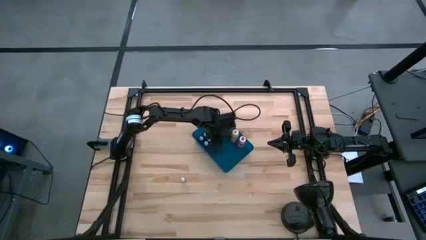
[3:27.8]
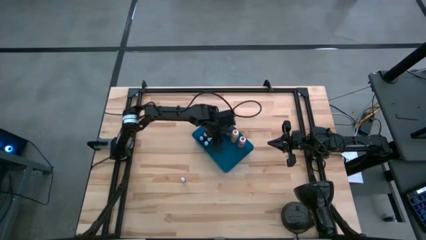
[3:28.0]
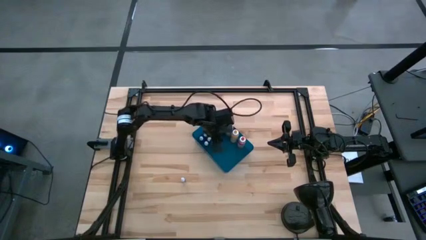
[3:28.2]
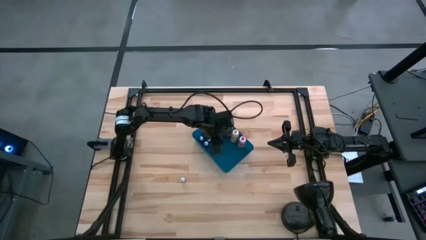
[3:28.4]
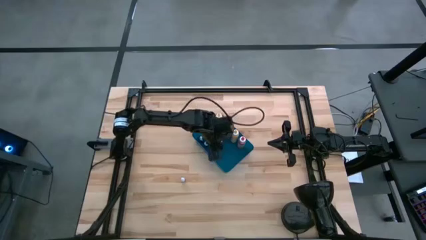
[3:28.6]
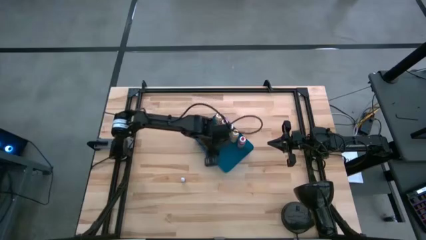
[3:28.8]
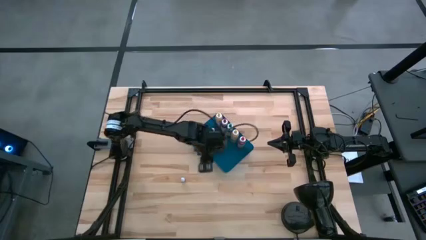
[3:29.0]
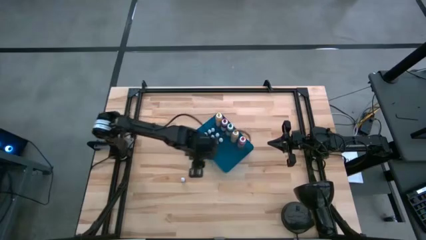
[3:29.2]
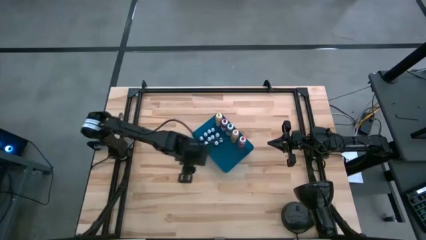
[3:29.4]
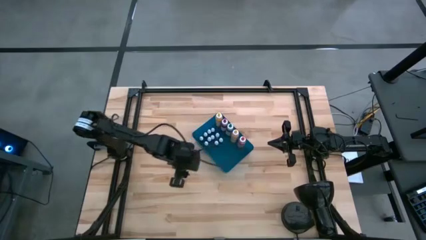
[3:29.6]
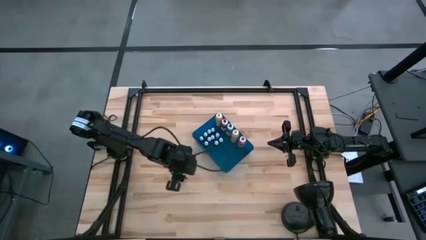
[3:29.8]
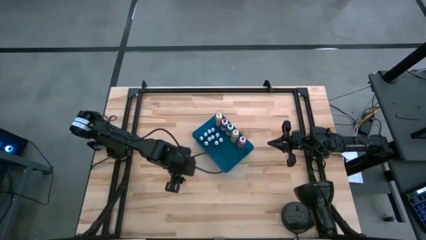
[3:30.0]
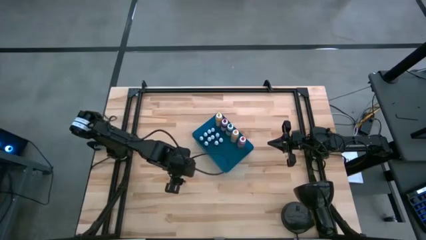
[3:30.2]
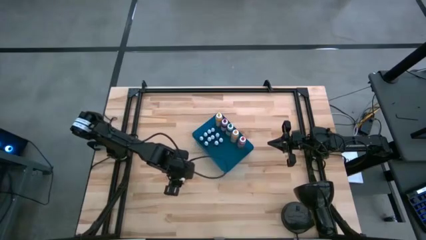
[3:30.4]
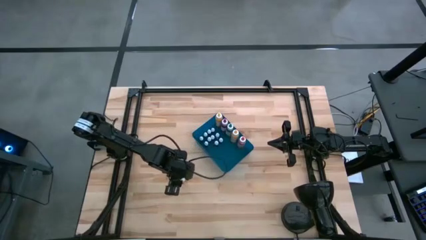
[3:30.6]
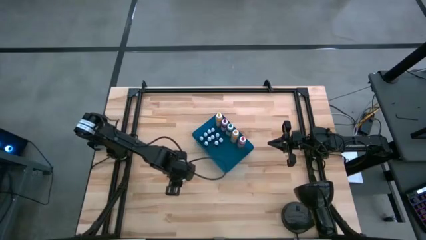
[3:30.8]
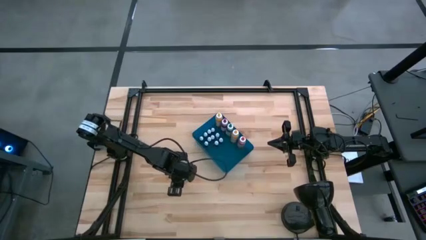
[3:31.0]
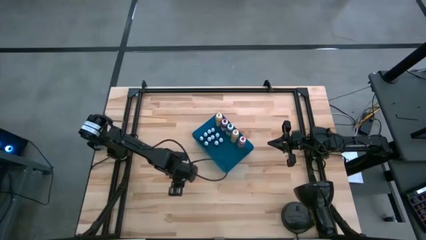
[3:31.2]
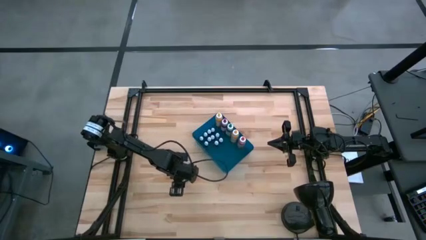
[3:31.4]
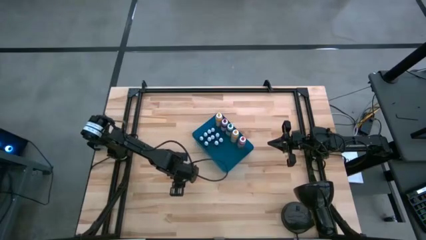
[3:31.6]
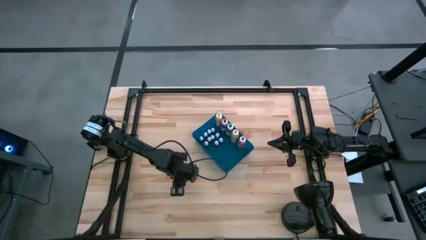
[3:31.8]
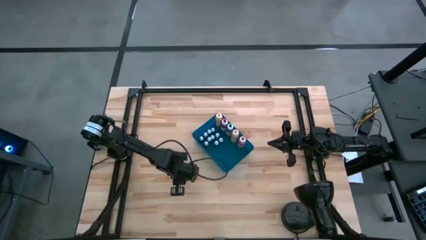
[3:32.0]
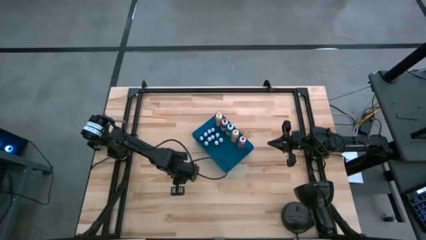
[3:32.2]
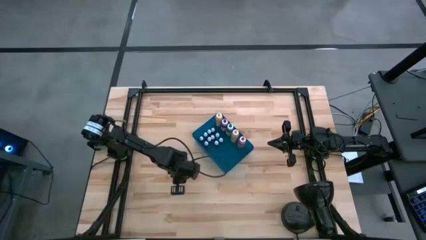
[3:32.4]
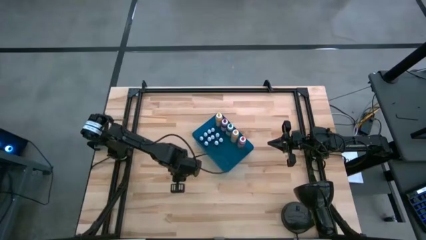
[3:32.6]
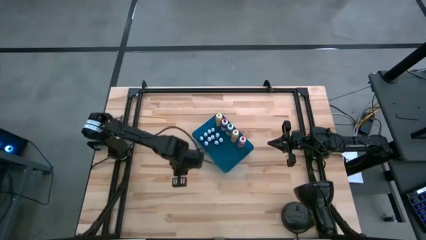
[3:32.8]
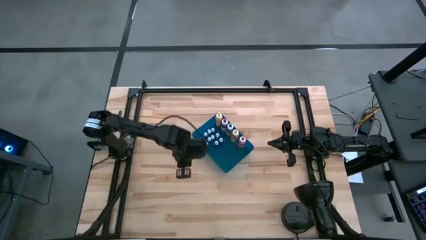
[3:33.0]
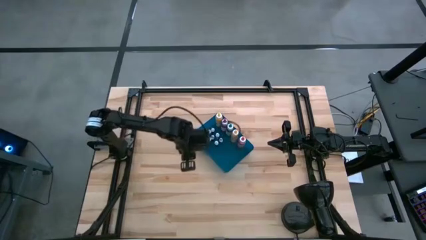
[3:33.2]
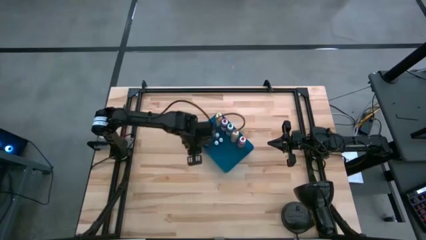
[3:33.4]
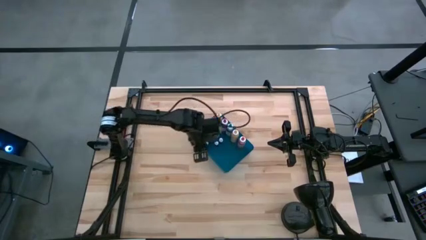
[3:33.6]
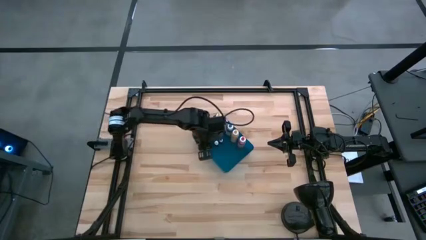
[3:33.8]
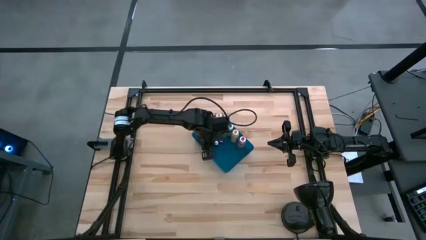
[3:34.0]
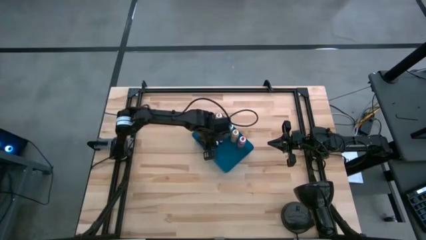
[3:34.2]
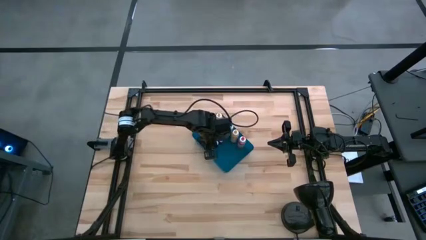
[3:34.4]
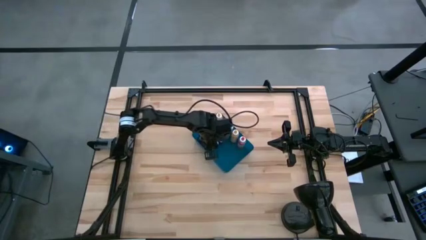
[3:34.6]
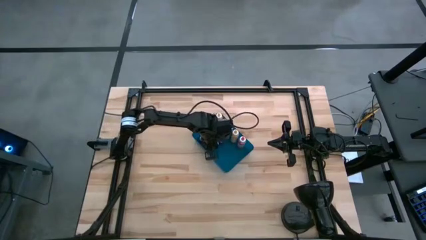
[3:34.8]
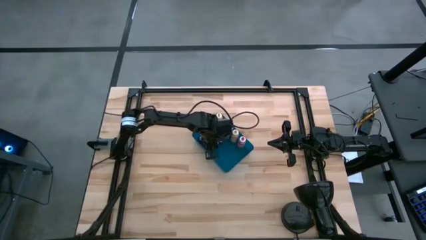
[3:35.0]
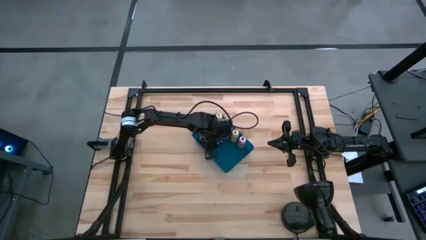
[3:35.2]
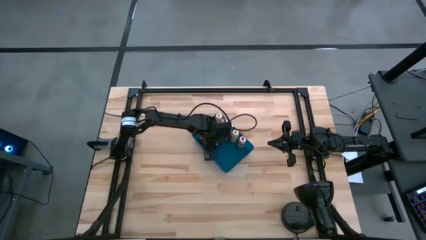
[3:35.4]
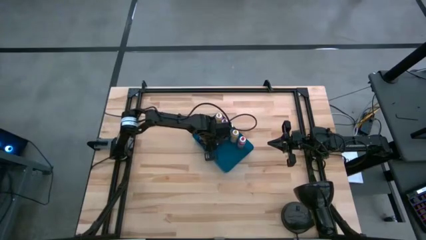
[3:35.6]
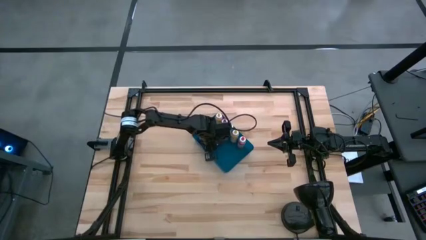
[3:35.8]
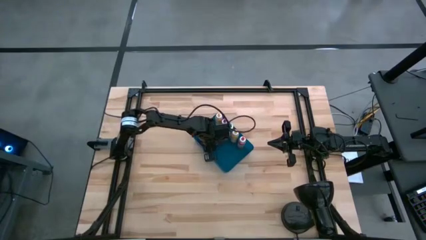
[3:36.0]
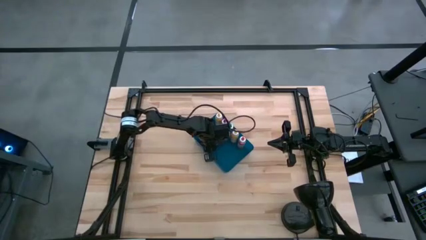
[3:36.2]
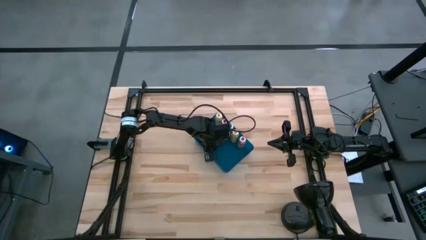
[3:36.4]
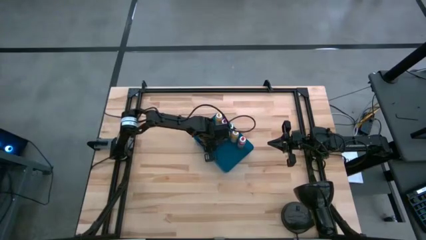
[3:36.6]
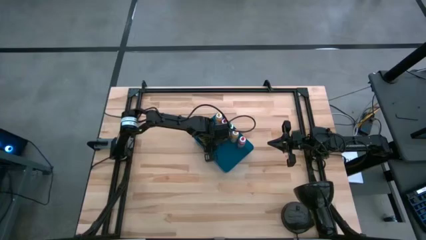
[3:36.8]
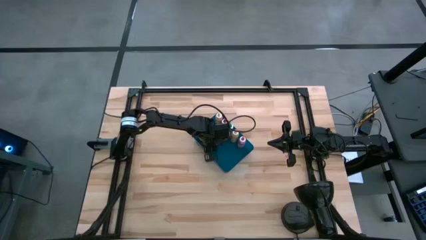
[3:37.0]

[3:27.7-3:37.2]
Task: Pick & Place food coloring
Put the black food coloring bottle into the blue bin

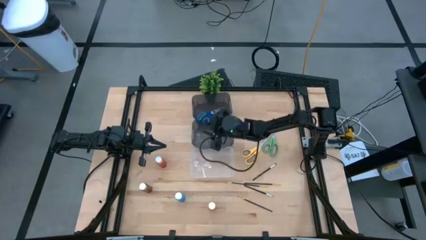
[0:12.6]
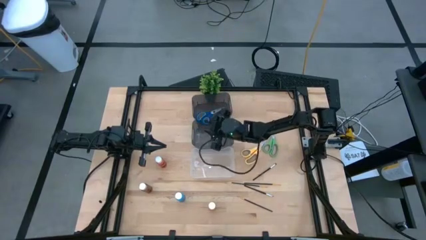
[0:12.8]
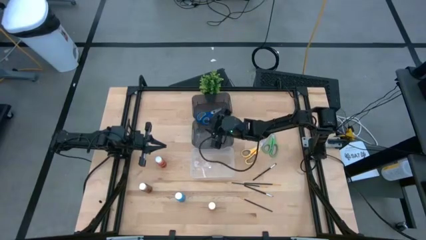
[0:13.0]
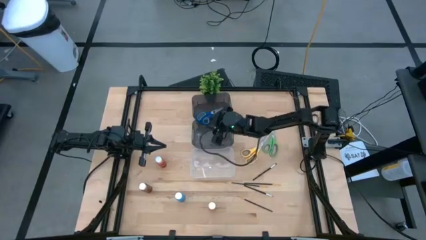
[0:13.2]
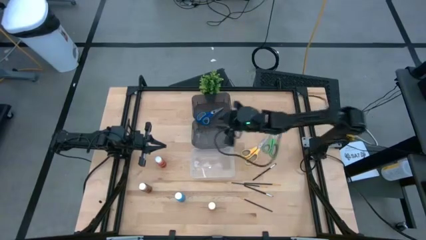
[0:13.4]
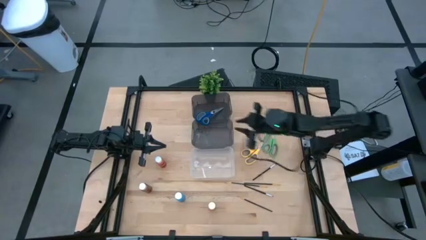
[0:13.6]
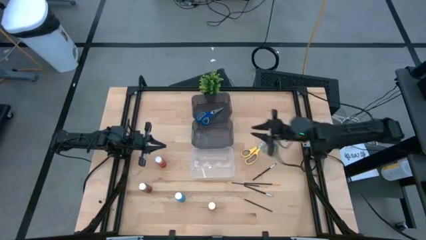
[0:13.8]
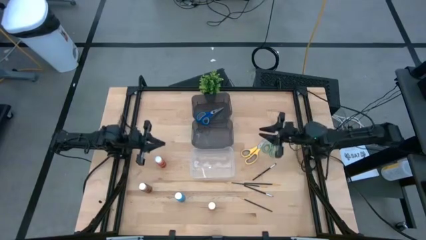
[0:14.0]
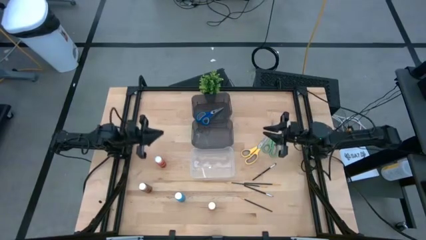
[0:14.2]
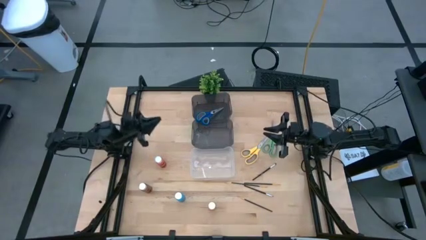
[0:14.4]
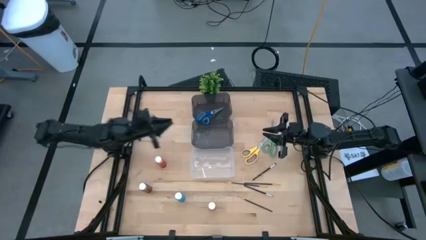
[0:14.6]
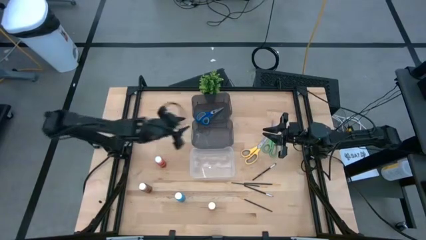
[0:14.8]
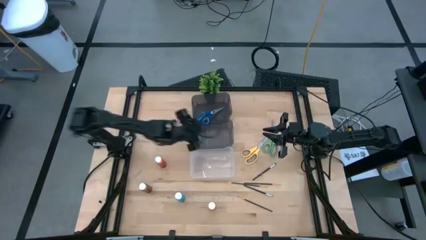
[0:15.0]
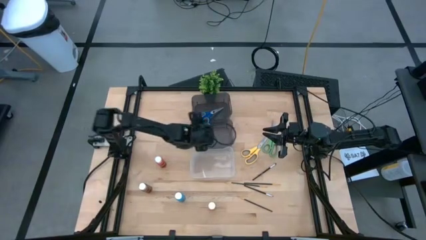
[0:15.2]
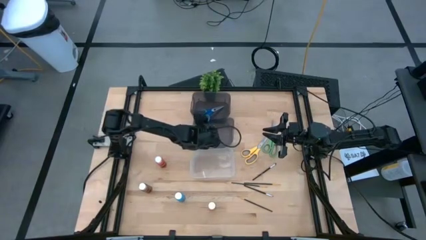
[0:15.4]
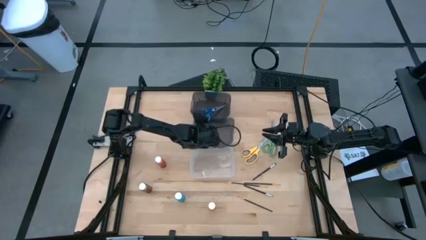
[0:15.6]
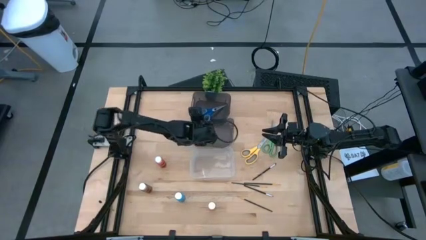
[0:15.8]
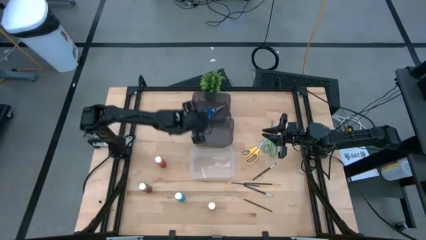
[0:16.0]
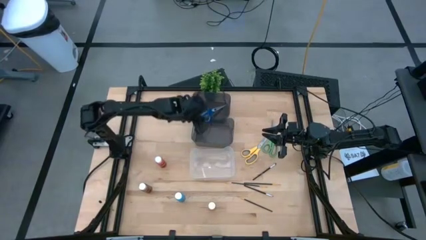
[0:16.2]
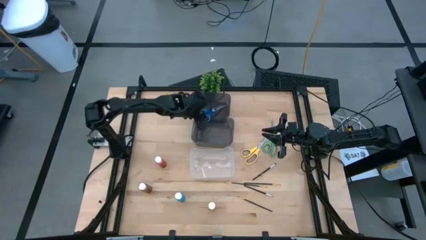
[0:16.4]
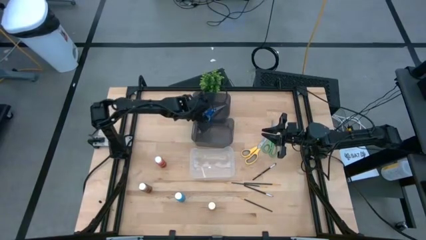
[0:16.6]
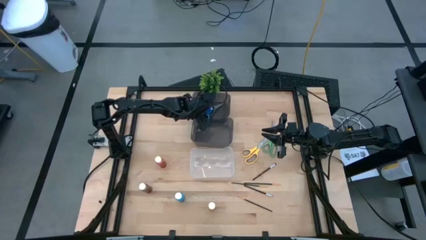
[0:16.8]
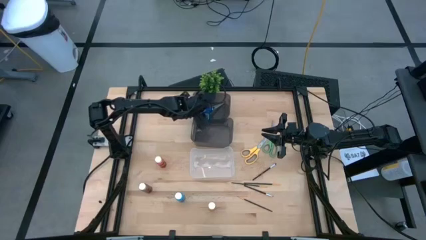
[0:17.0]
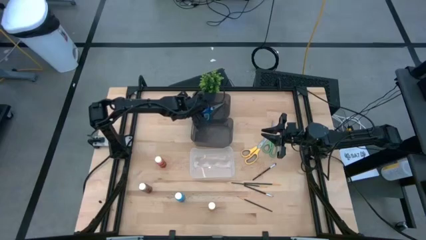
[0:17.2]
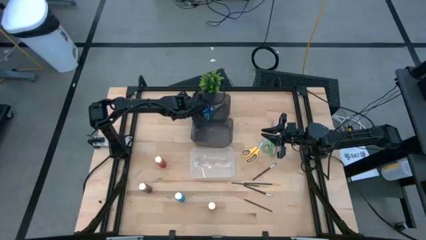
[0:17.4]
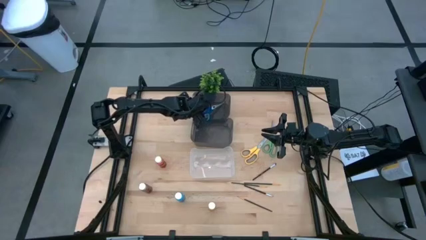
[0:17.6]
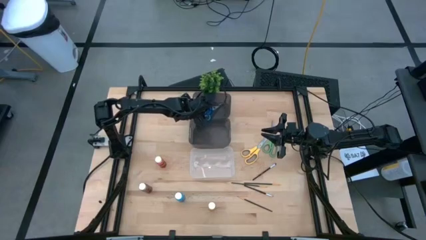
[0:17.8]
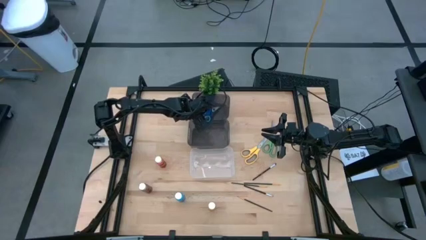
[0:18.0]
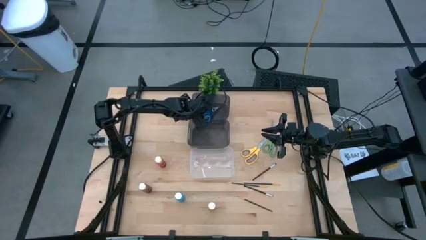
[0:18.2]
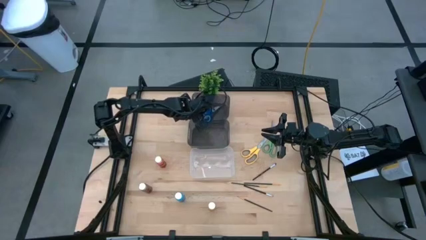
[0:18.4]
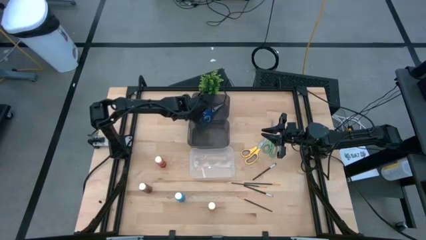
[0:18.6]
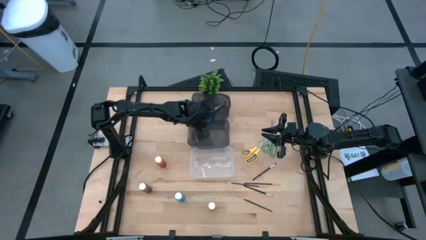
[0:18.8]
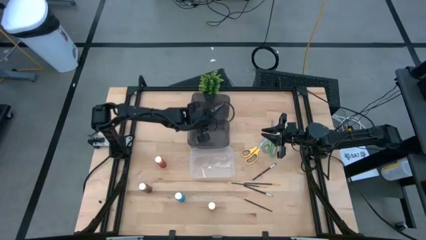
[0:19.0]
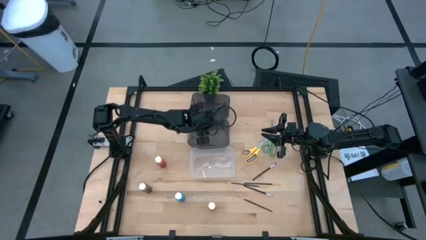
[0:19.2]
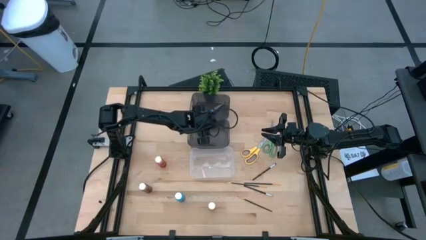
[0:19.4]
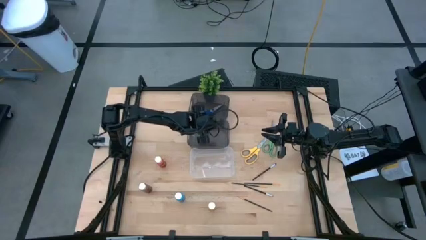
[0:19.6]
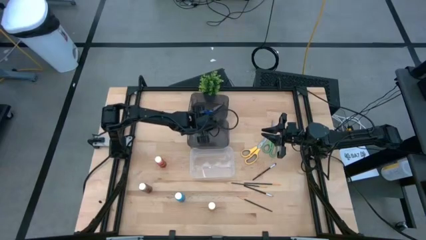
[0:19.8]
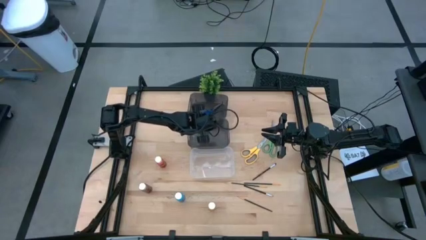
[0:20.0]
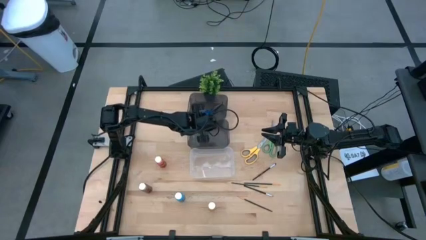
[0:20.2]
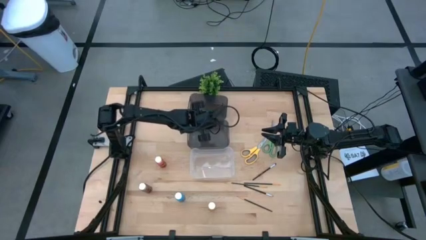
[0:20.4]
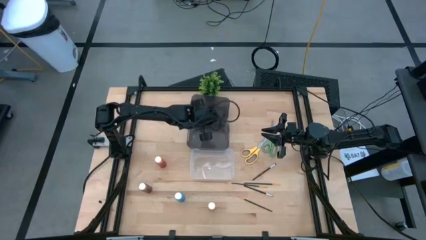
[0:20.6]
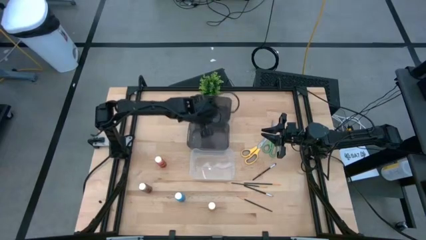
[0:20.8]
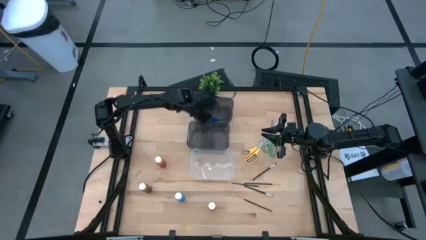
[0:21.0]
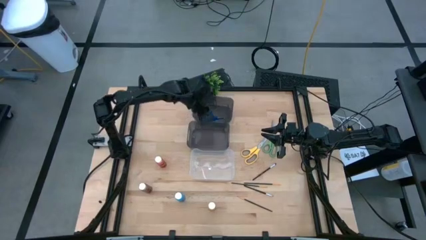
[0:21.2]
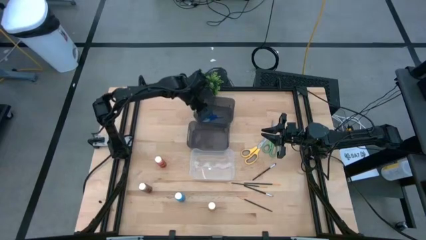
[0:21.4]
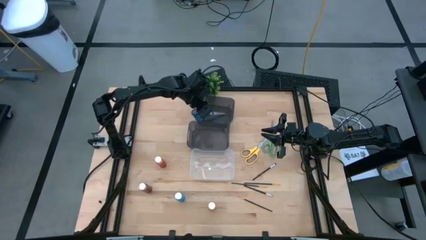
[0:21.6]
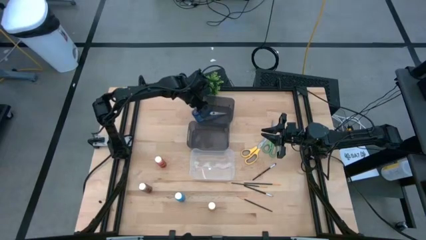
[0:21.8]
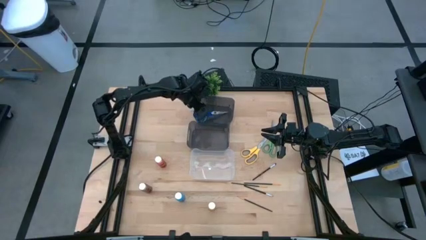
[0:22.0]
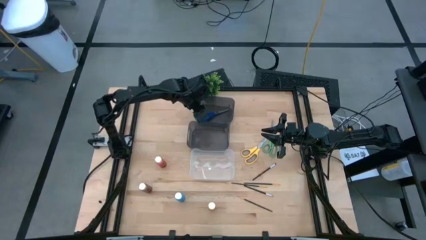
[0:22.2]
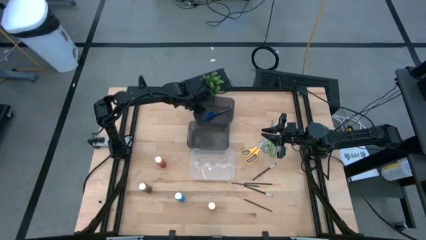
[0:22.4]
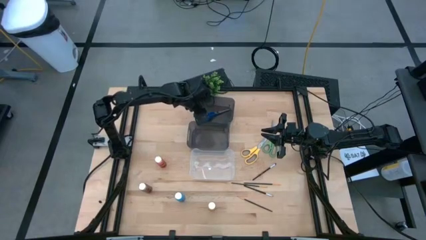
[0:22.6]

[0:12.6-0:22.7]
Task: Pick & Place Paint Supplies
Adjust the blue scissors in the top black bin
